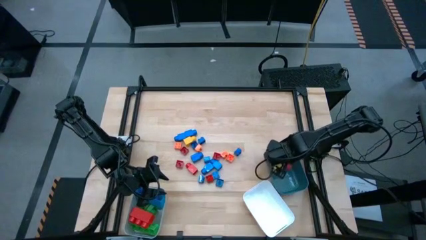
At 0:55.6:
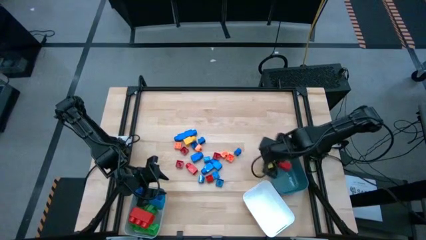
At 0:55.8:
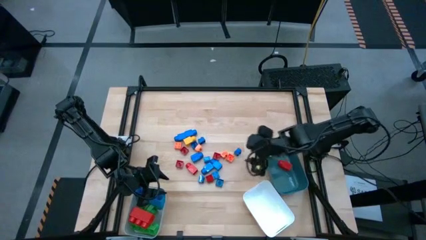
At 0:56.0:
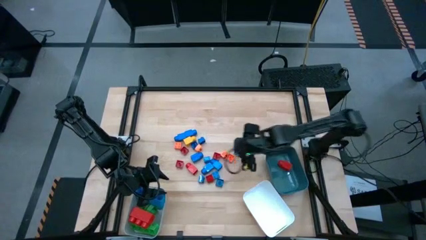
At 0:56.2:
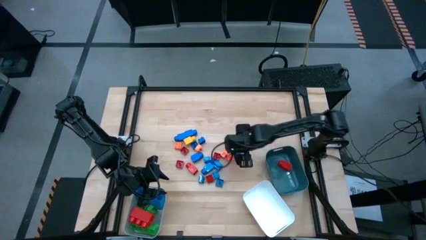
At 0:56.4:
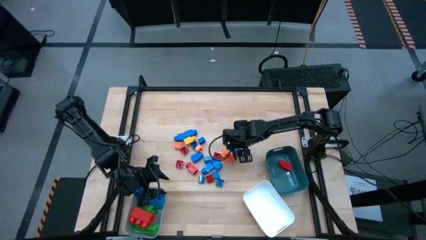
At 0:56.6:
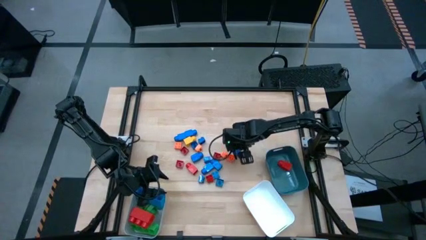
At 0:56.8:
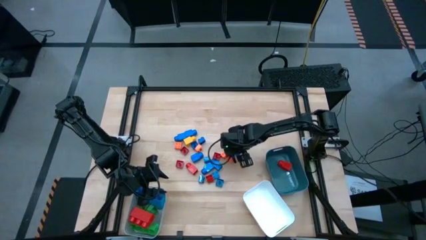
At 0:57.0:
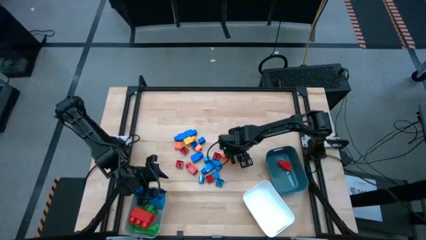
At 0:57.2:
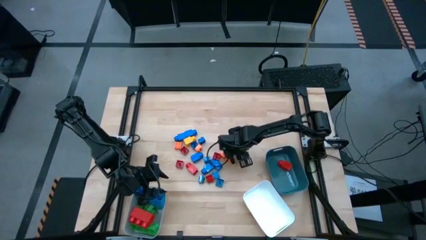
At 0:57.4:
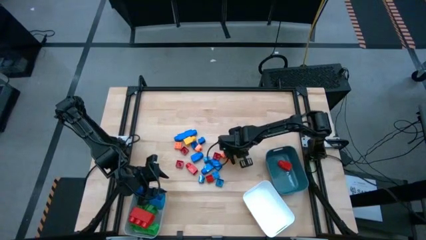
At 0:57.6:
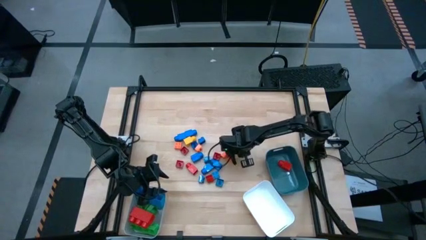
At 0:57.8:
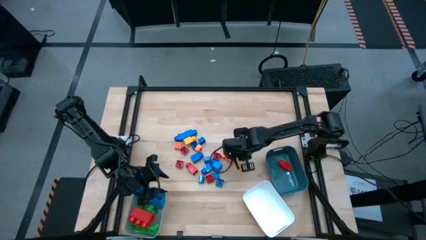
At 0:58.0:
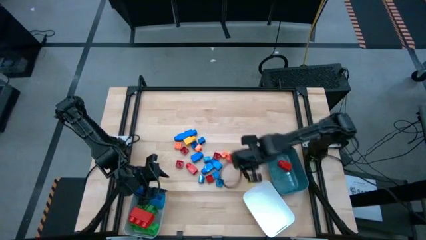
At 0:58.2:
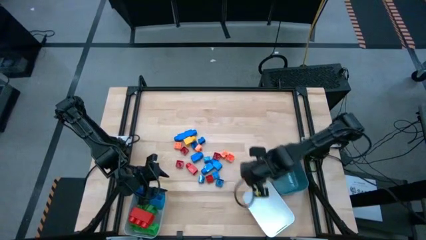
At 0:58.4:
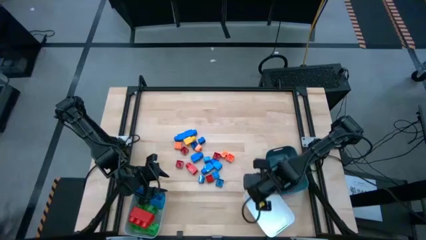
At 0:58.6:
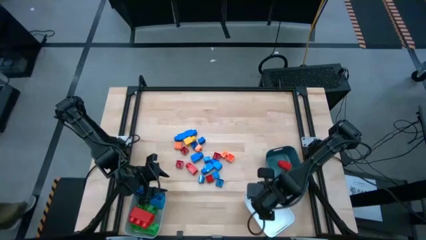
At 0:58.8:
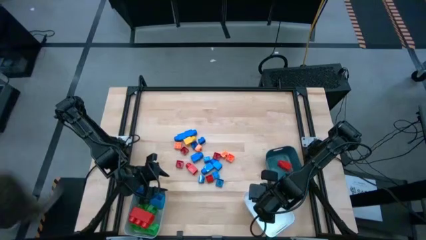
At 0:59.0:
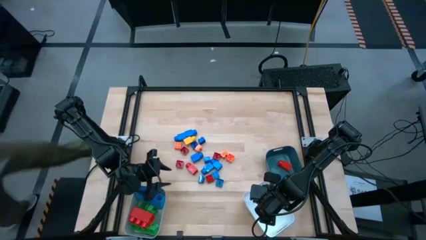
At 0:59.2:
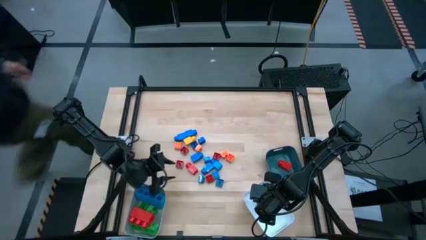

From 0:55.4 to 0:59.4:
Task: Sort blocks by size
Put the small square blue game piece into the white bin

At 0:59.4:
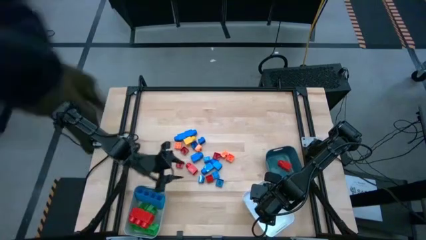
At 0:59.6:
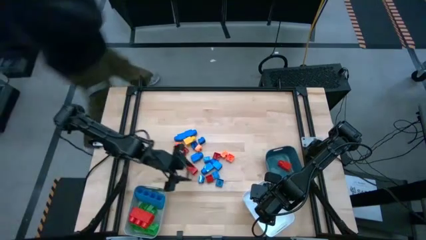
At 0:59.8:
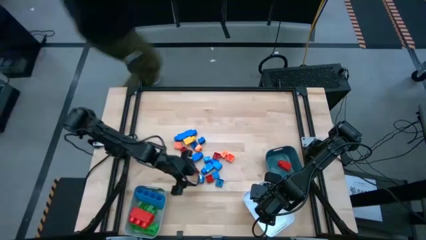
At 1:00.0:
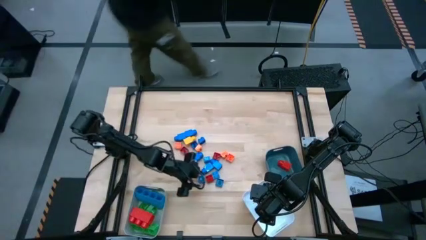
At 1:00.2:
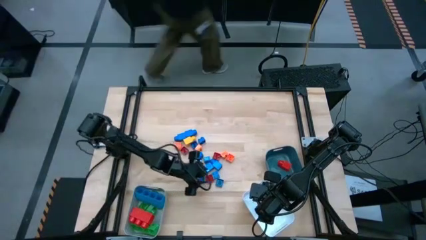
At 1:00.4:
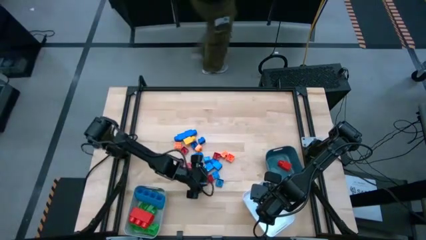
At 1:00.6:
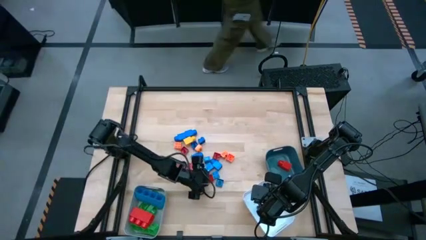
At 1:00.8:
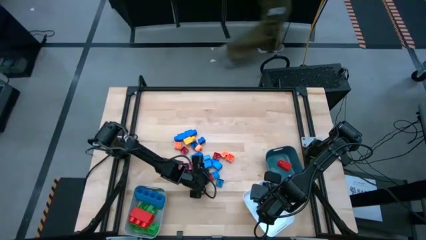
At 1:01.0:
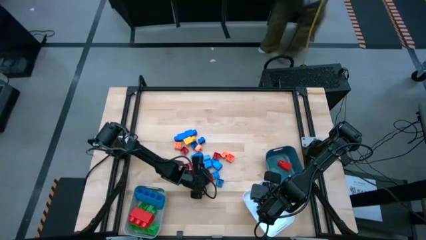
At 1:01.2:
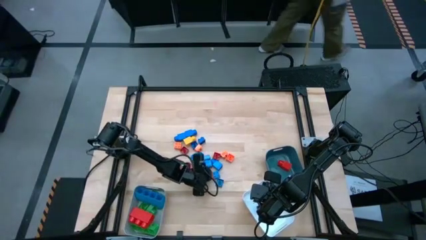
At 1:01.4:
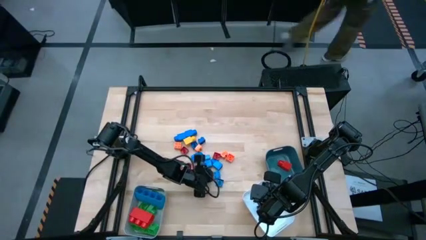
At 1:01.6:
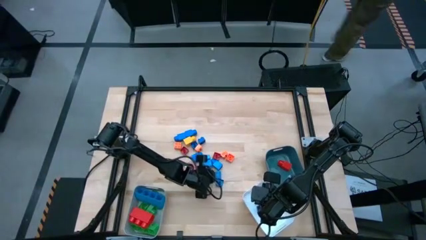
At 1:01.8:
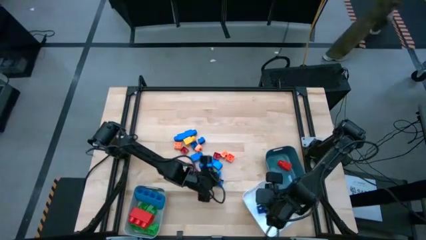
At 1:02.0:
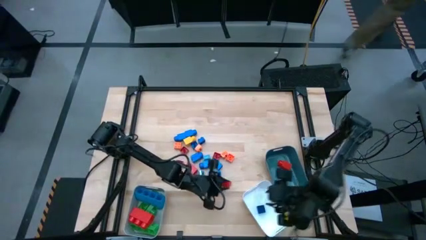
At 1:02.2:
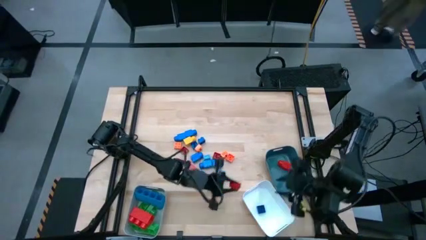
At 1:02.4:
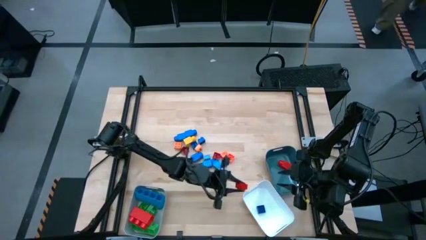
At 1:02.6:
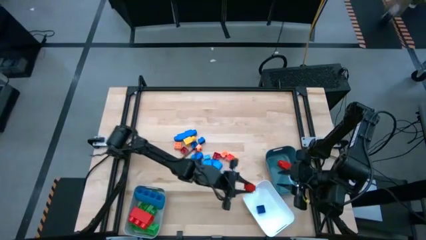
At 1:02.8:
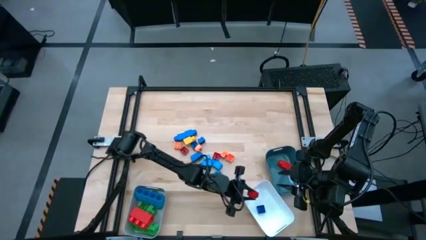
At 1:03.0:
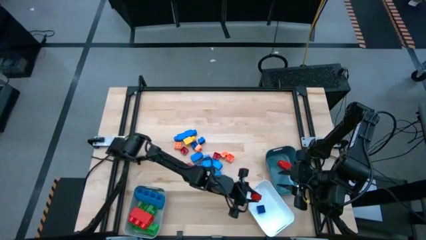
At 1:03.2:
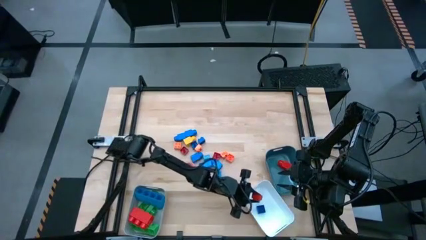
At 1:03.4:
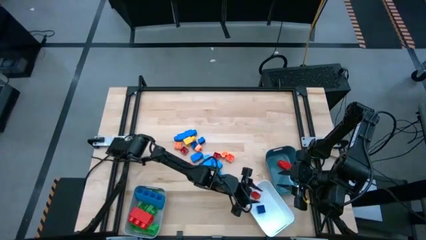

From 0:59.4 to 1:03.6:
Put the small square red game piece into the white bin

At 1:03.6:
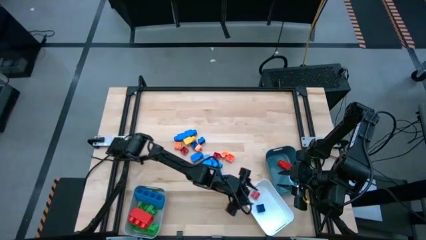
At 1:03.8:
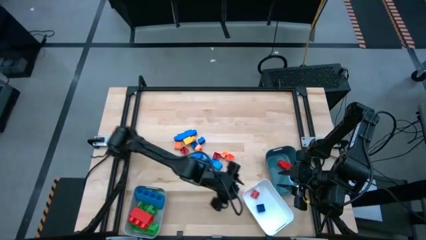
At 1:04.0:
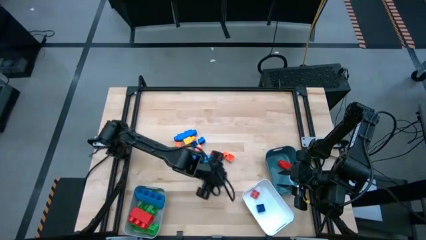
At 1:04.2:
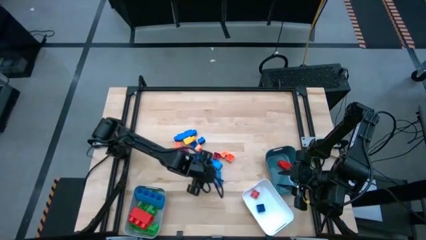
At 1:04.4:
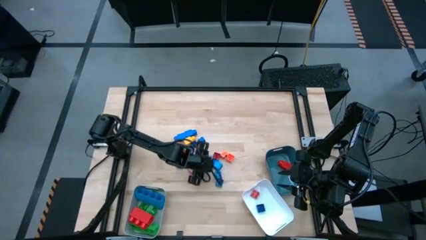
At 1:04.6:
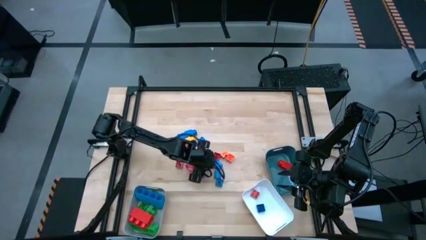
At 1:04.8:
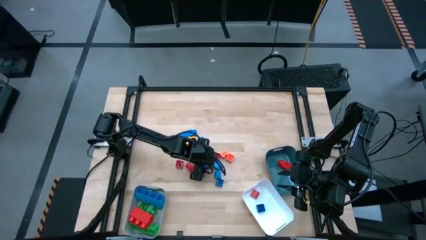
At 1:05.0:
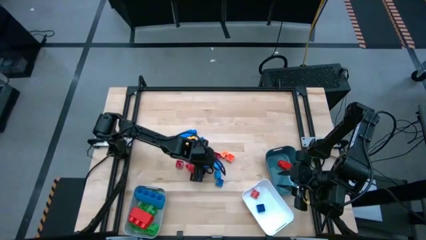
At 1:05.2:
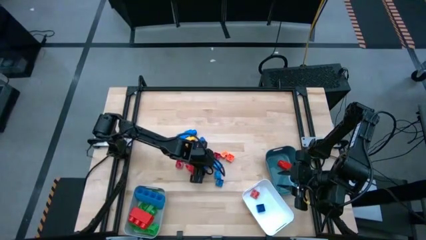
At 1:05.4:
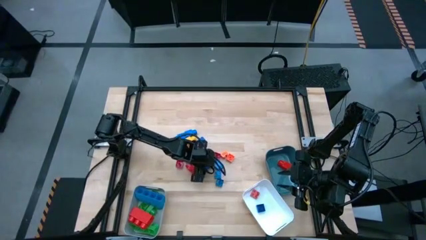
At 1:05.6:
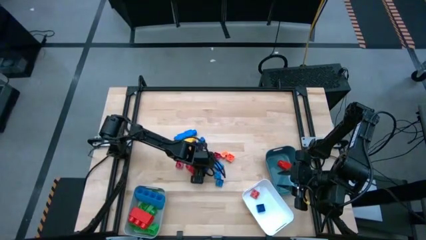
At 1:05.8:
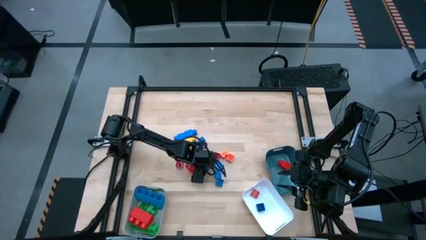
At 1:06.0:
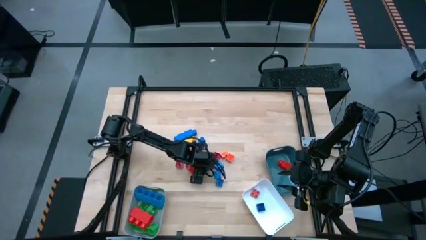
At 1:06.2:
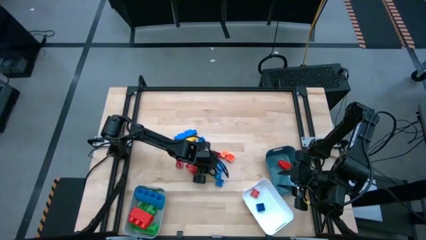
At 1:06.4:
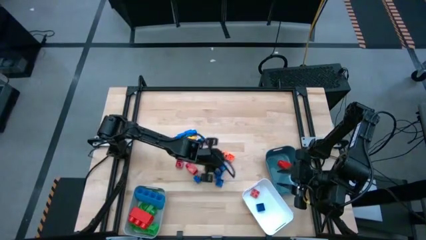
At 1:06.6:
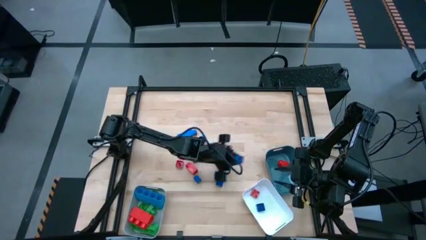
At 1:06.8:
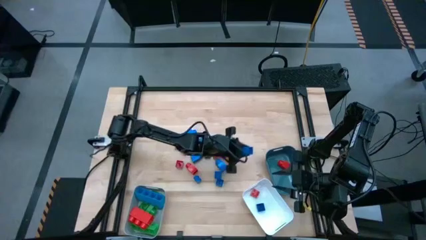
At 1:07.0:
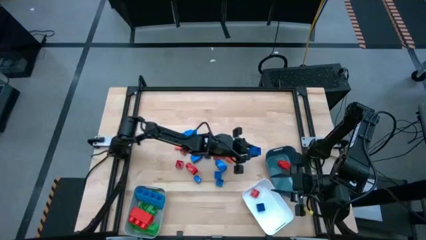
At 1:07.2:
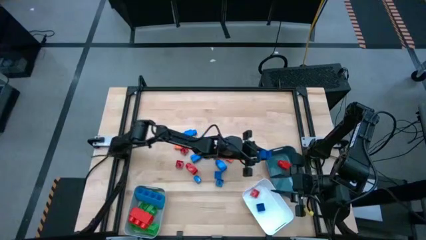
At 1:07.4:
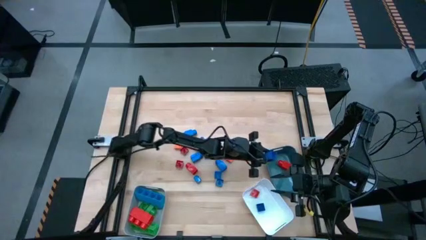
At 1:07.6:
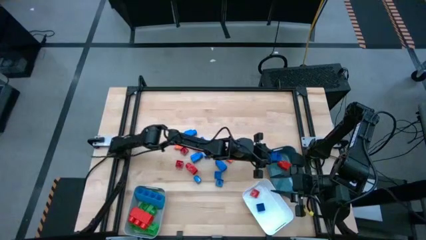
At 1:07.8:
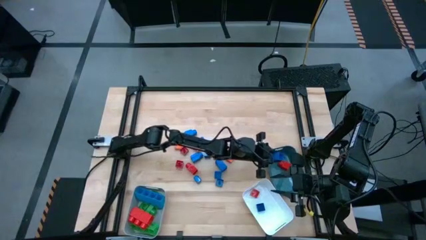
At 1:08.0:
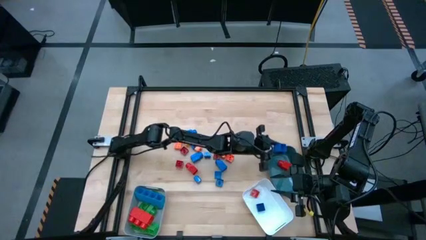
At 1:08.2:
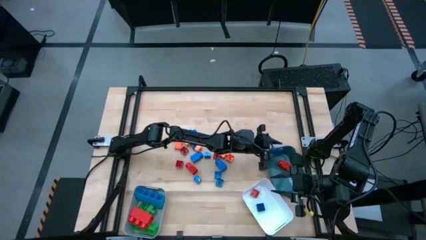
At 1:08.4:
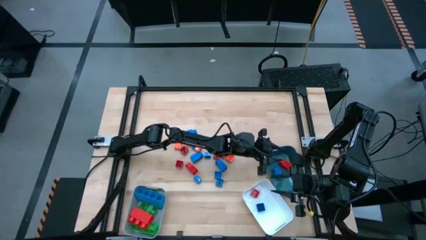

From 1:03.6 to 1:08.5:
Put the big square blue game piece into the blue bin

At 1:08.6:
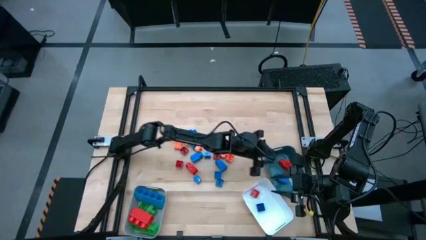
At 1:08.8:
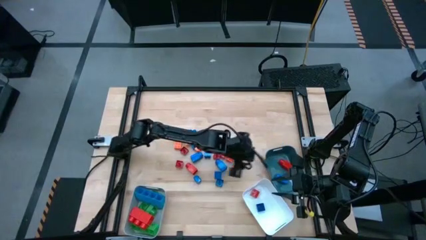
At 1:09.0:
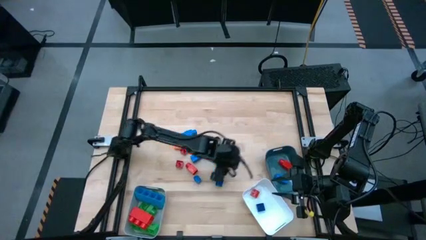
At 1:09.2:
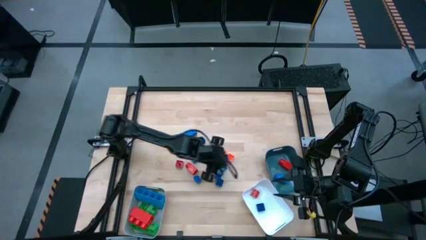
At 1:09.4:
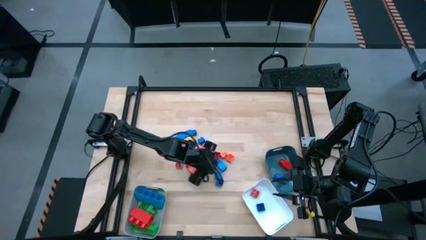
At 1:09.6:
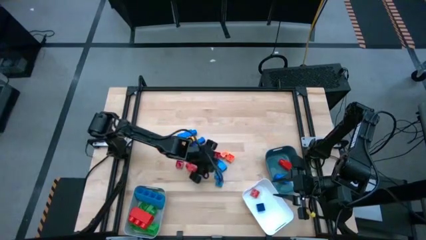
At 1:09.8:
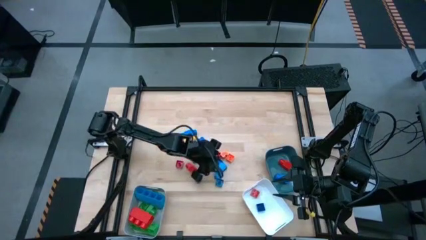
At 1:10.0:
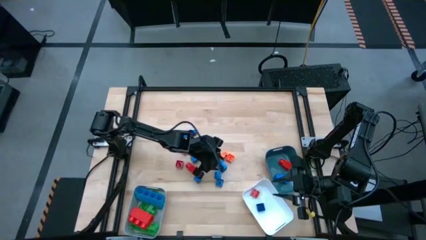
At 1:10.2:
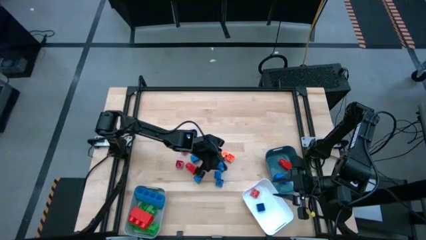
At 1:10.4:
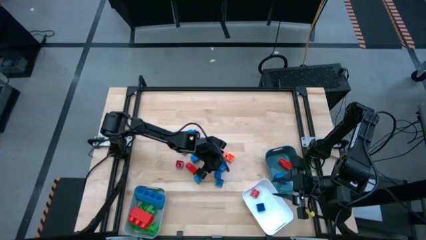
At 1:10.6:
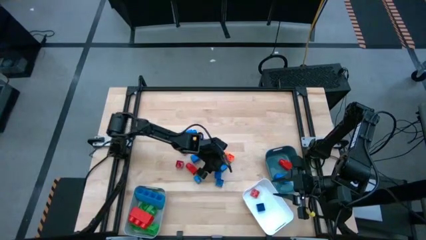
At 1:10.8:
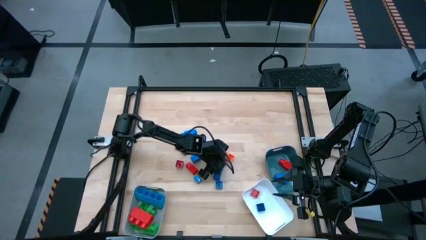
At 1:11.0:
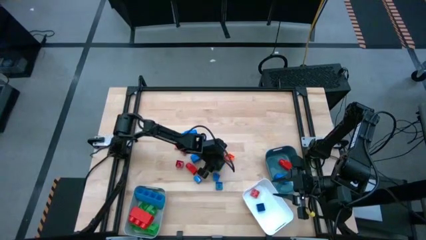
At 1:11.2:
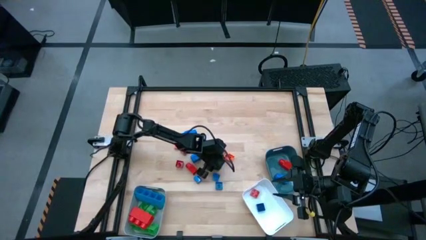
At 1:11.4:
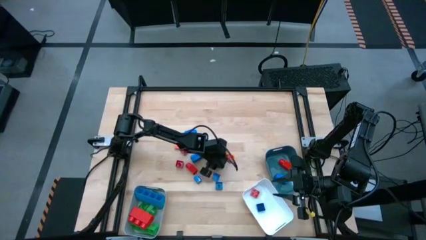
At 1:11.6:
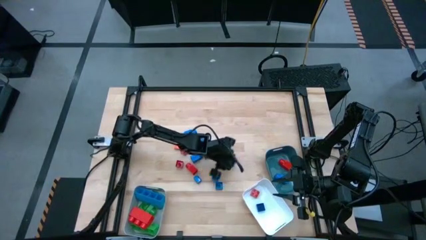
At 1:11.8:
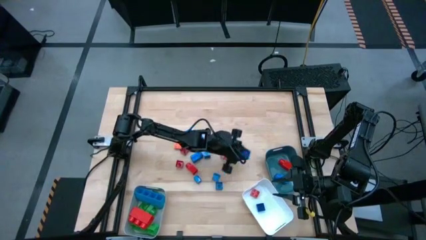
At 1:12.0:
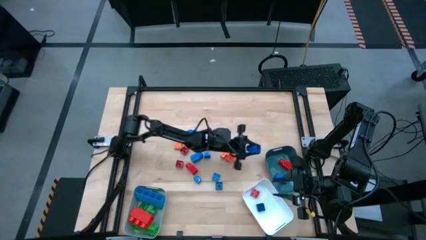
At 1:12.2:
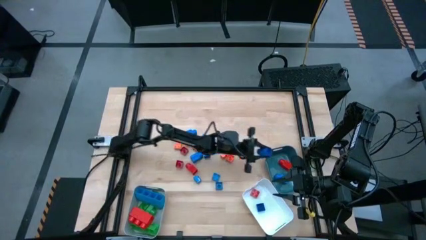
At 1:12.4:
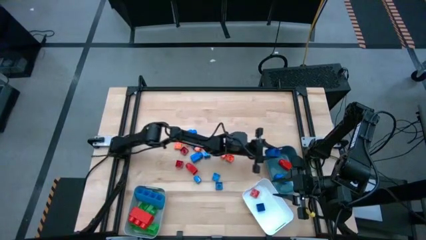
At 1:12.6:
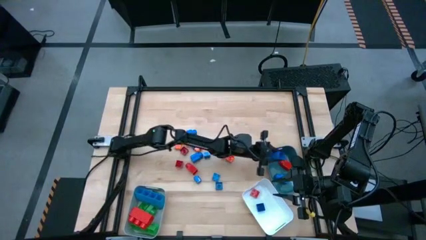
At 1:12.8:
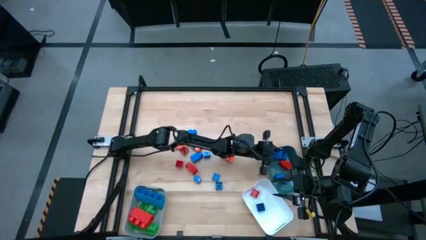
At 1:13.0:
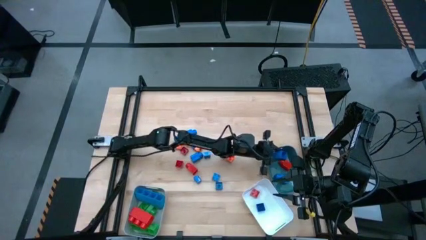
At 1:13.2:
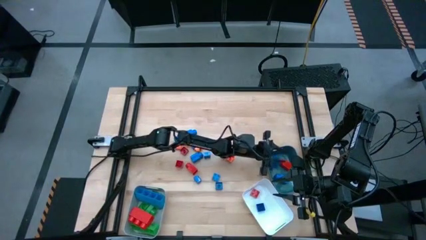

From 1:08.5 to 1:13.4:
Put the big square blue game piece into the blue bin
